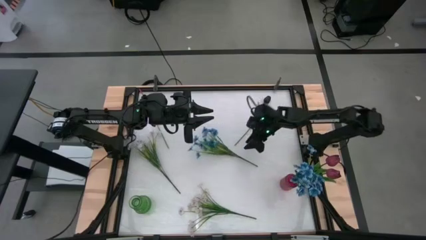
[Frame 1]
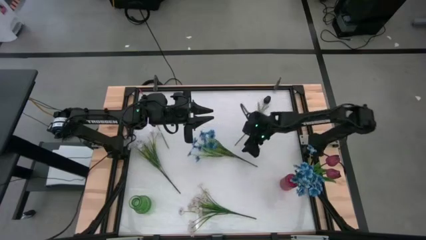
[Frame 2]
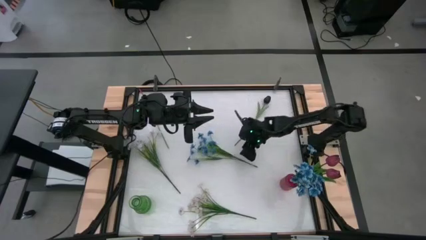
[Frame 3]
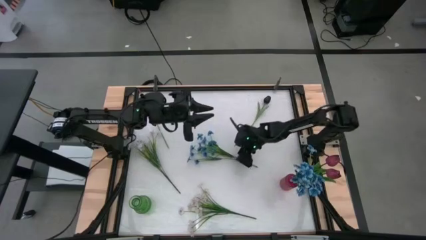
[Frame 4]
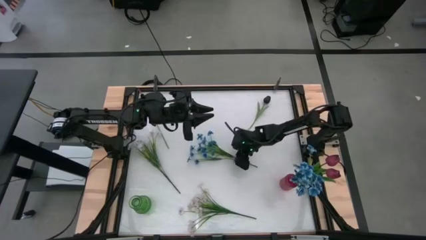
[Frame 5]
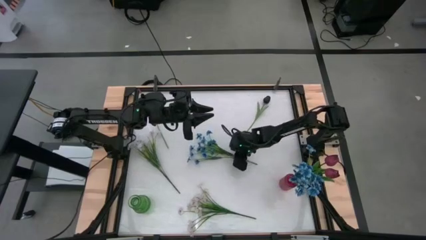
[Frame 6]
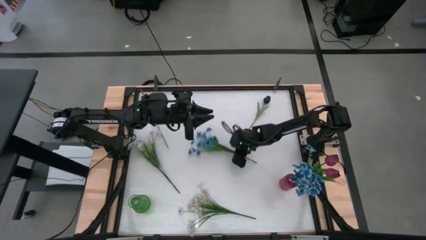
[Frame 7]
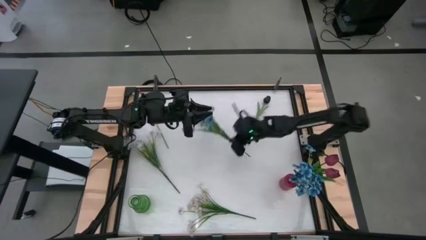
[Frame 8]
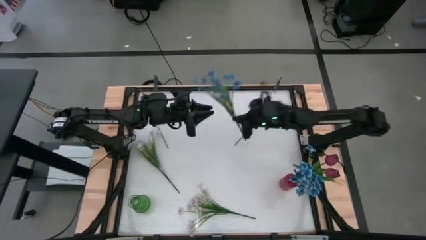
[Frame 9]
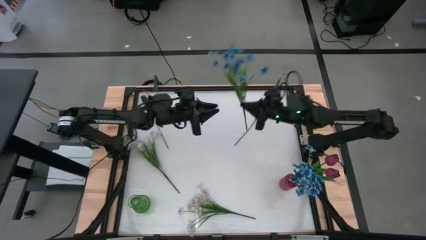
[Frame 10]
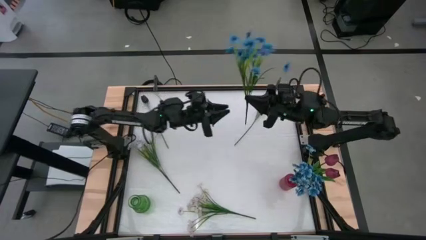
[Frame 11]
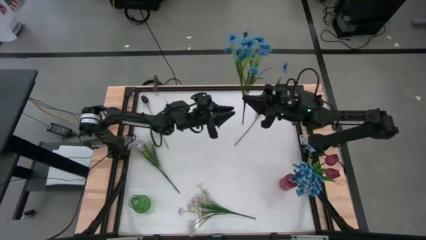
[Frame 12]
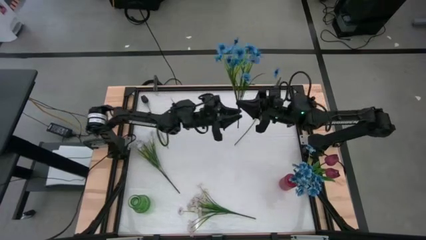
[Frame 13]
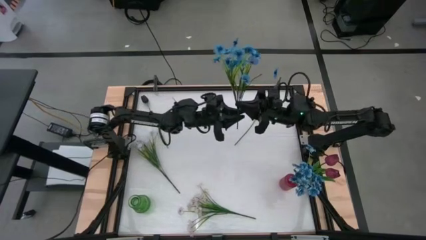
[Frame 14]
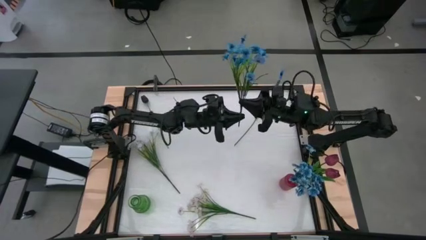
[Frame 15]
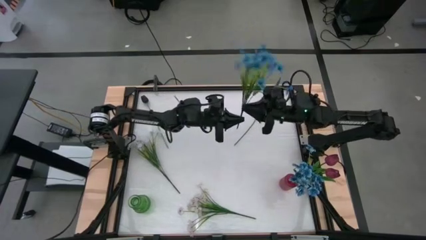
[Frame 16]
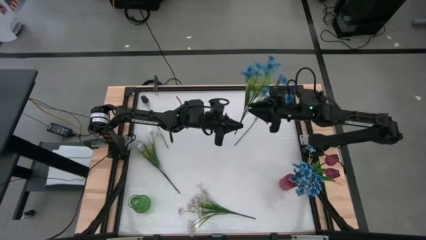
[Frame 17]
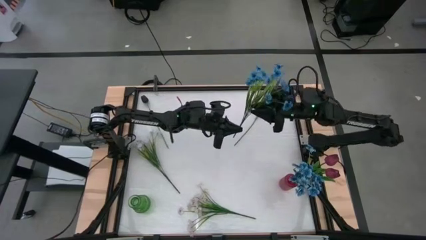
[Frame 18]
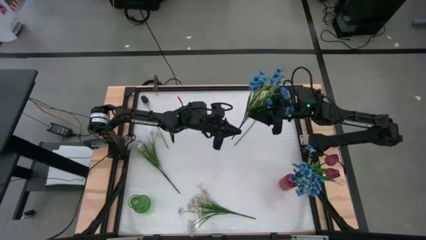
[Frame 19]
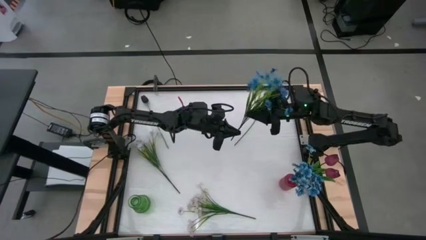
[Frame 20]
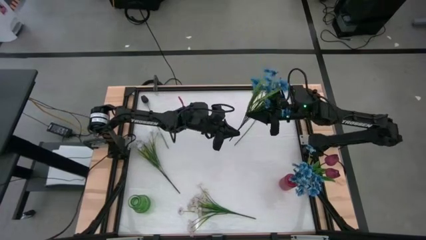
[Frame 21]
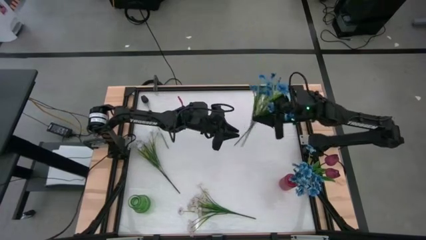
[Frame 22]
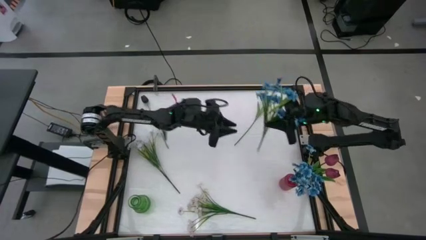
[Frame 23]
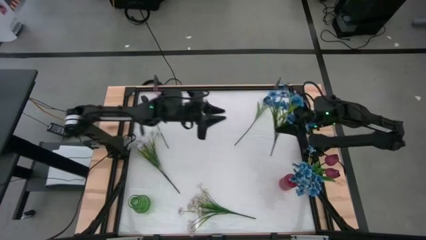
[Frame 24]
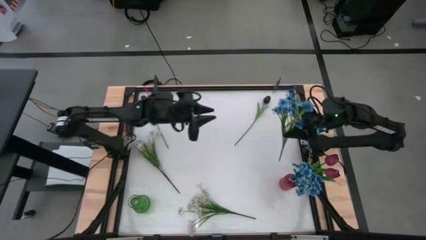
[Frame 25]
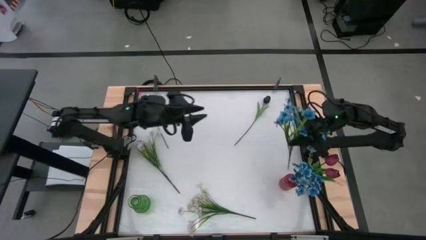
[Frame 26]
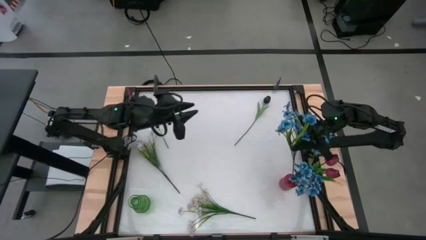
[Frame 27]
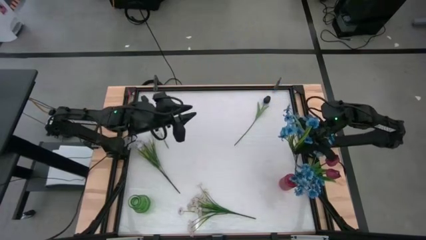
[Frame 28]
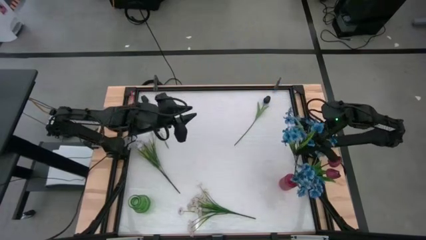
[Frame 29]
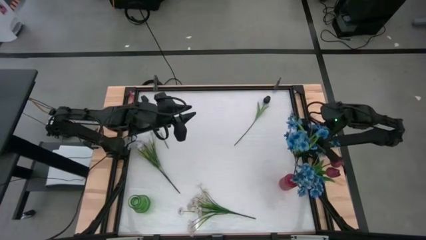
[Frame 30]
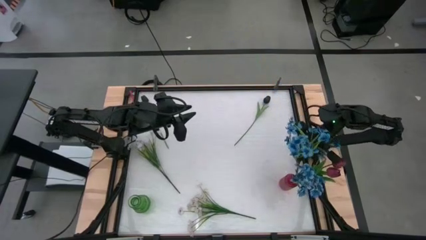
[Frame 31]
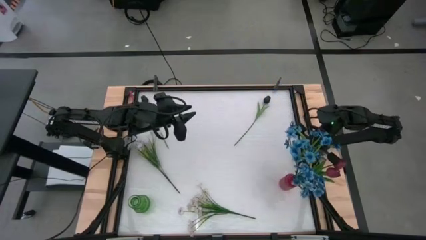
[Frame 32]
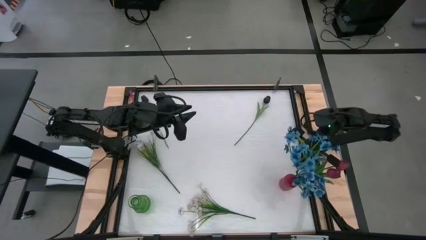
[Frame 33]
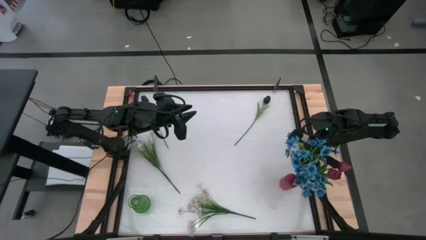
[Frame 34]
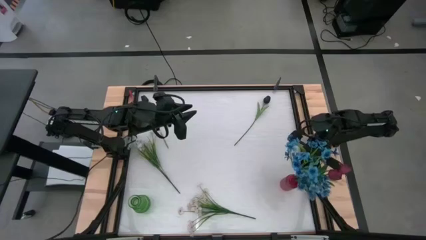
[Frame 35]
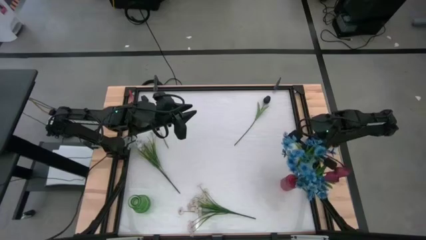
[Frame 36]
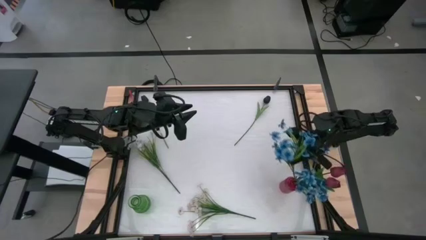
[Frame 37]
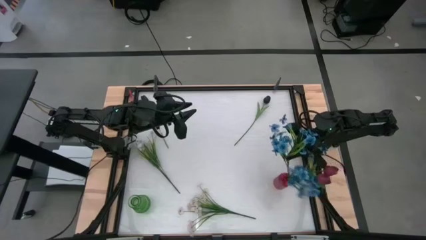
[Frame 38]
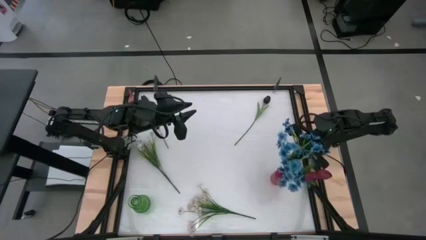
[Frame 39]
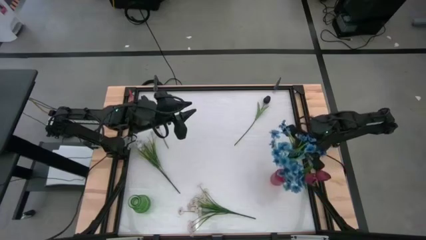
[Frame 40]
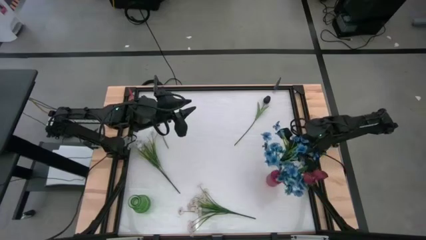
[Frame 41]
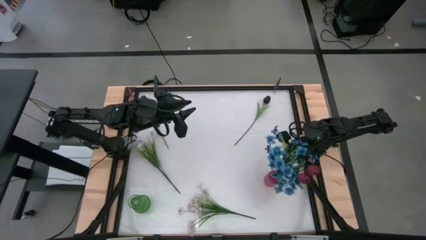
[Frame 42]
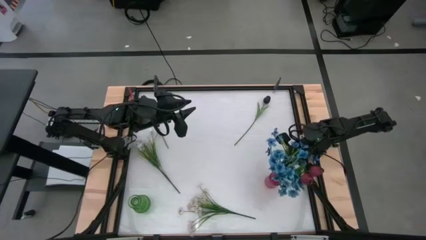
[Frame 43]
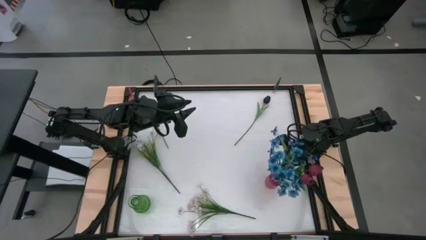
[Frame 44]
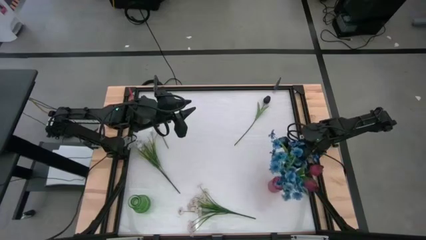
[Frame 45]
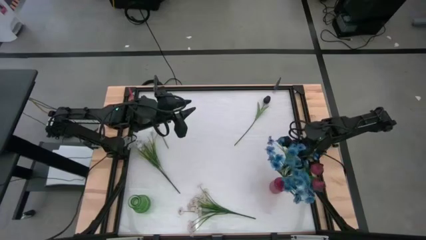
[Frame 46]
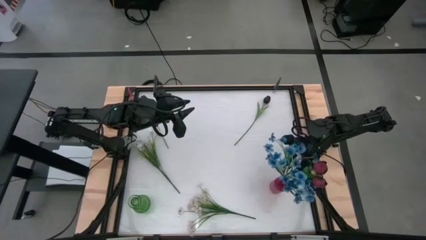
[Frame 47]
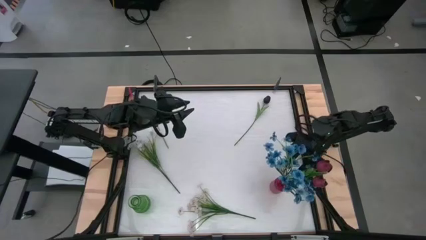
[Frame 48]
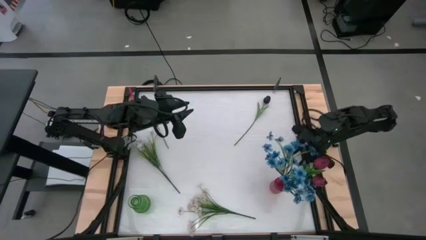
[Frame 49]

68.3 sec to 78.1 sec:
Task: Sort flowers into vase by color
Put the blue flowers into the red flower vase

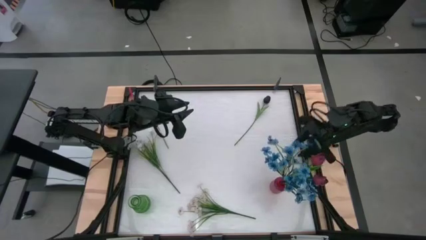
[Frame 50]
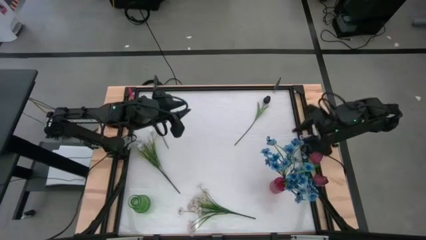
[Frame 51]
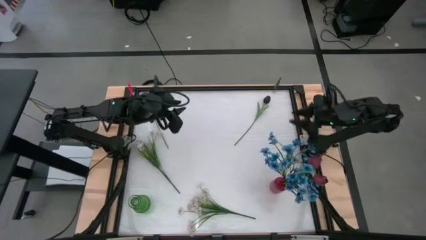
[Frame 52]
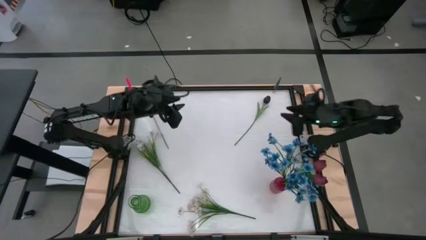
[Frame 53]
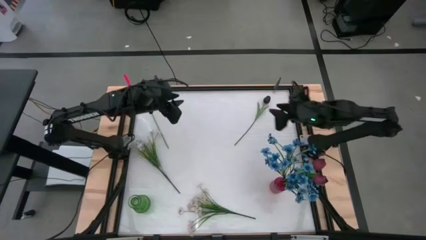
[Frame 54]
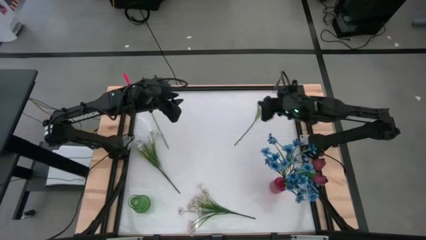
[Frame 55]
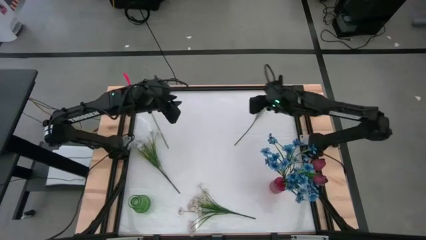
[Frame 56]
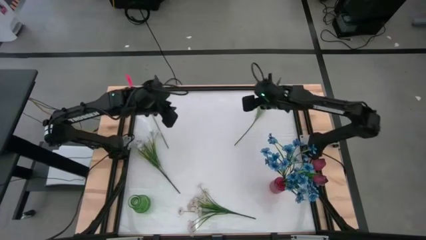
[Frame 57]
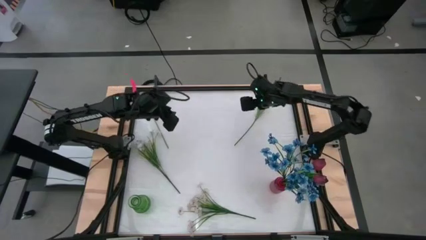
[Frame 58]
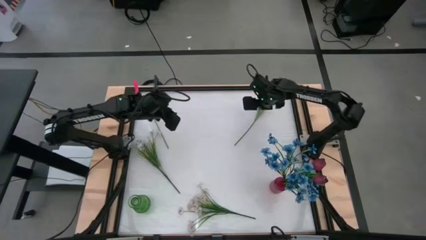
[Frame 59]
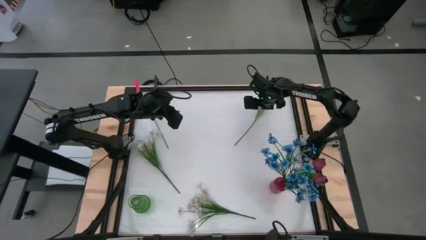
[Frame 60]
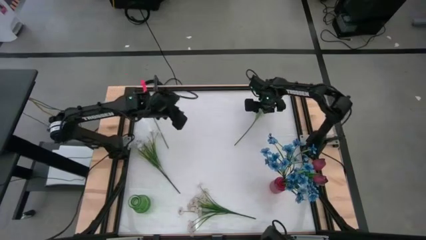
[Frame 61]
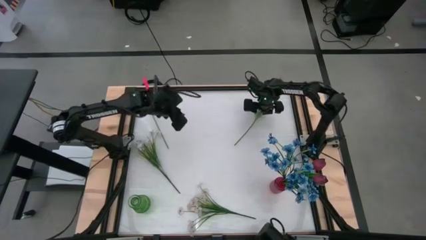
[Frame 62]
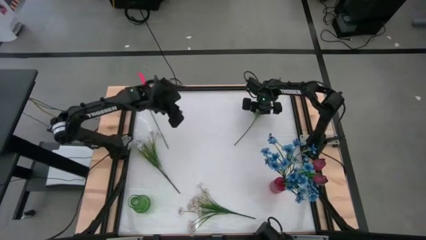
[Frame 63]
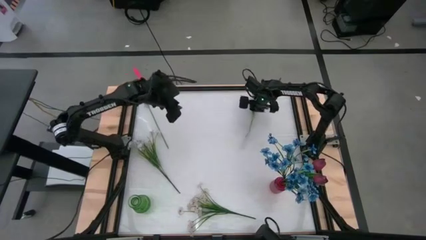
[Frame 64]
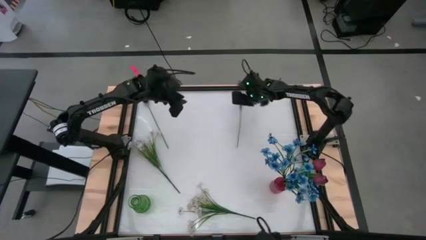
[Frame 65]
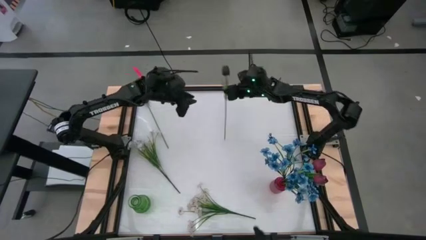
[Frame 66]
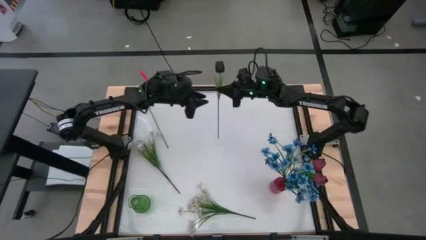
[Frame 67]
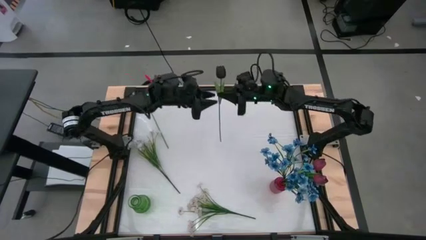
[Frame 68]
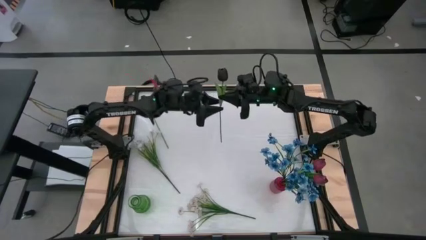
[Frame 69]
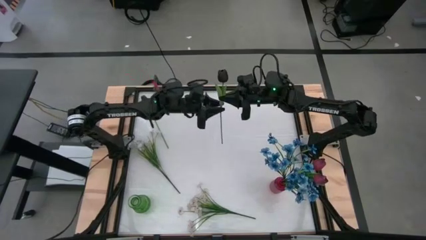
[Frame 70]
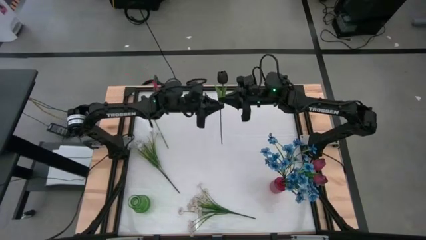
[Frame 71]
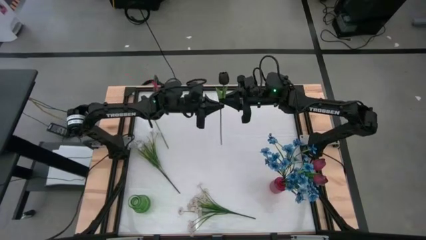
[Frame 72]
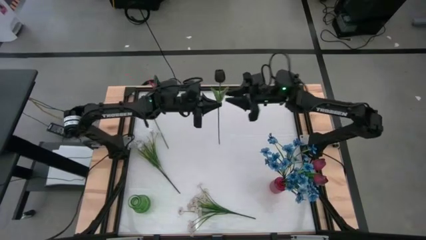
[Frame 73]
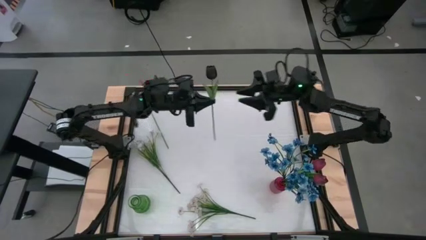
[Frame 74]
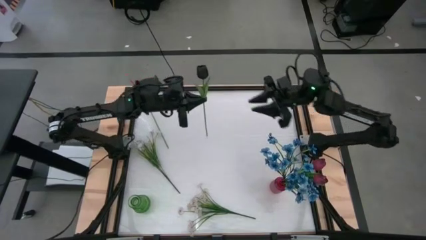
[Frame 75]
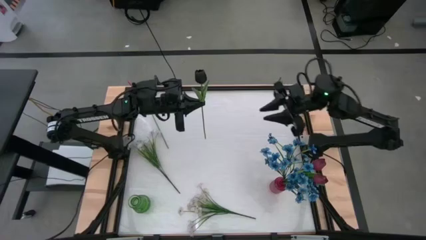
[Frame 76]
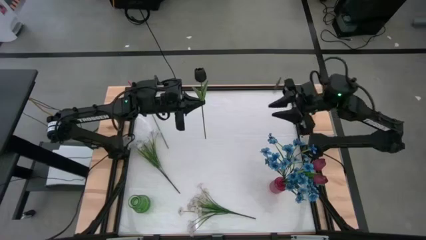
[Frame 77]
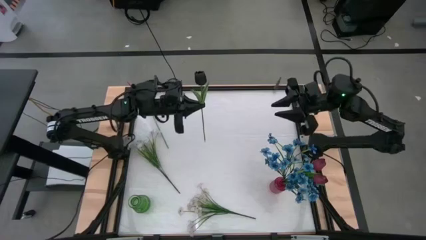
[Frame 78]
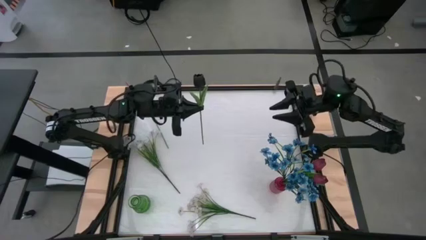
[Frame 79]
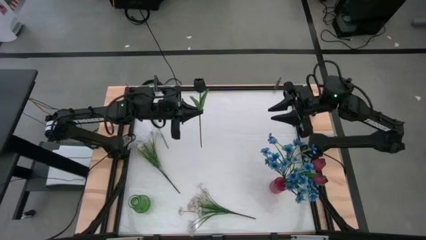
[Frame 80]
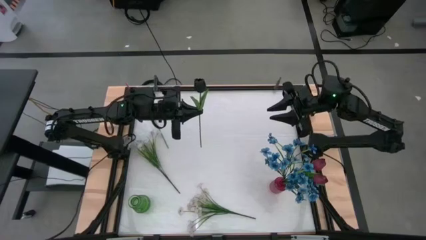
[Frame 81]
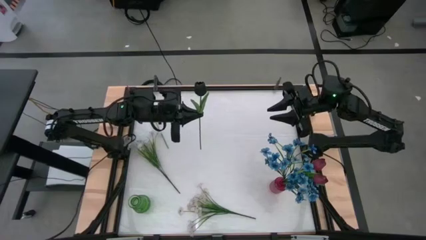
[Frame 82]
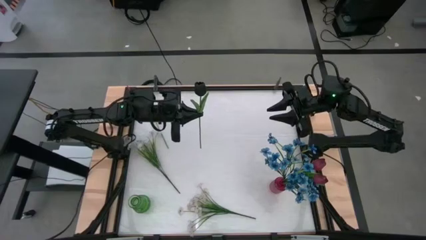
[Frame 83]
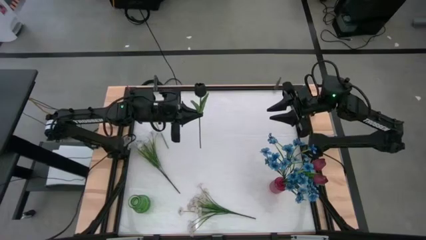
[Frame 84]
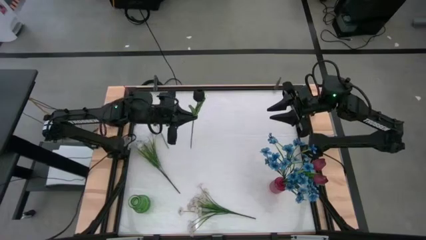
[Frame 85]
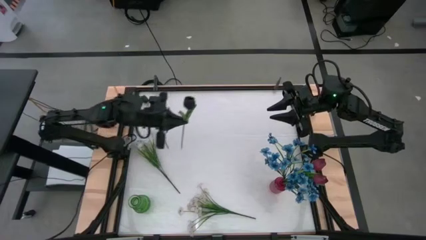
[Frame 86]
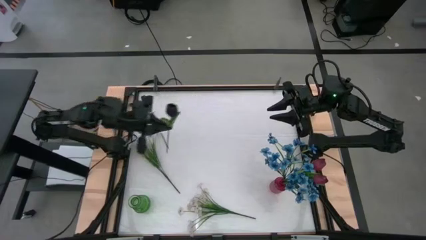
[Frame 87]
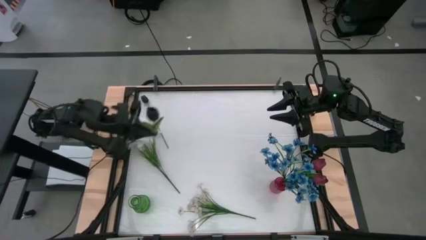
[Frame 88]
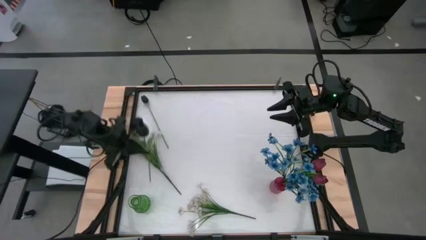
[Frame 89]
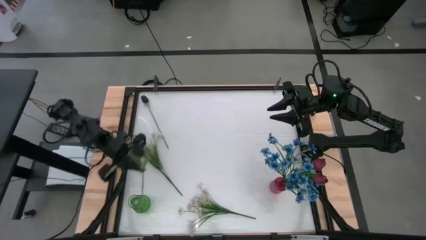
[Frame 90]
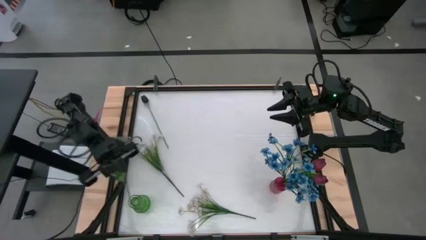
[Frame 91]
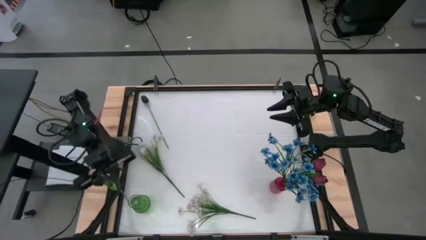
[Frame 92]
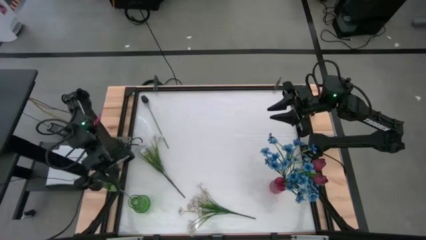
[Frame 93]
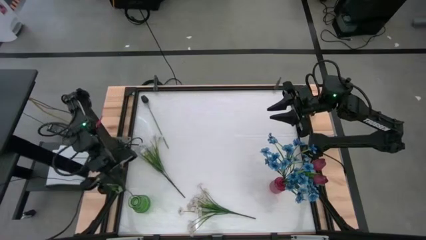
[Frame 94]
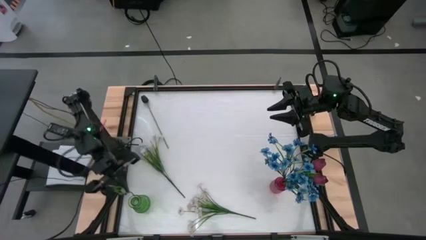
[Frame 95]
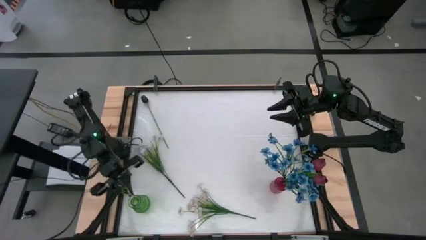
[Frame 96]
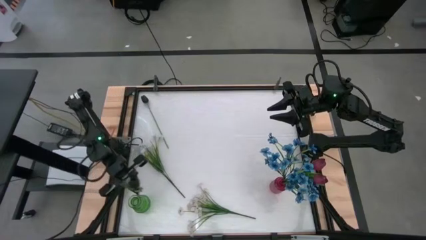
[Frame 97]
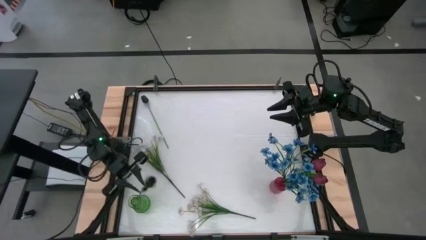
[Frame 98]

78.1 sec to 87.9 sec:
Put the right black tulip flower into the green flower vase
